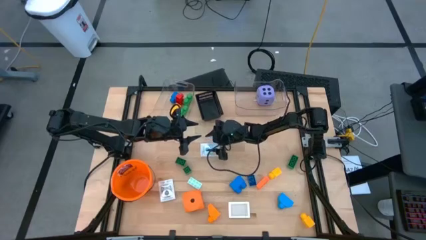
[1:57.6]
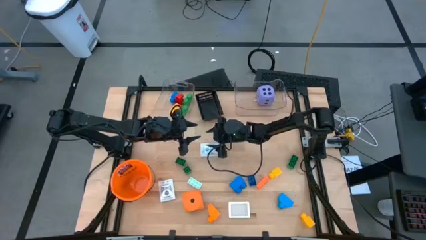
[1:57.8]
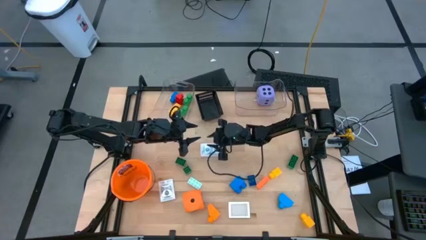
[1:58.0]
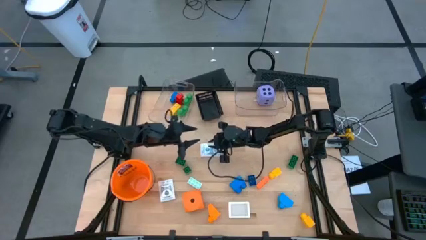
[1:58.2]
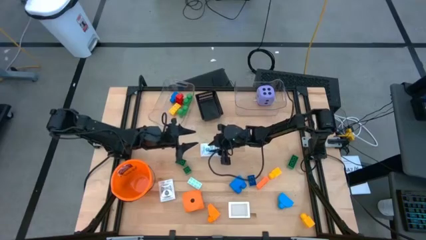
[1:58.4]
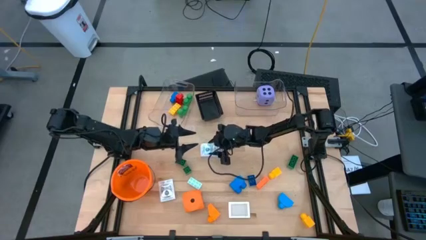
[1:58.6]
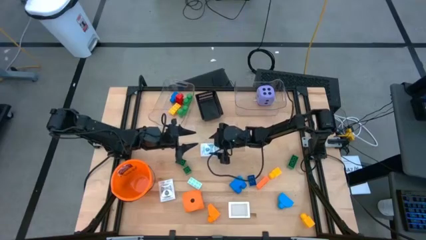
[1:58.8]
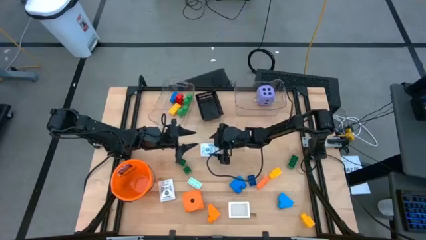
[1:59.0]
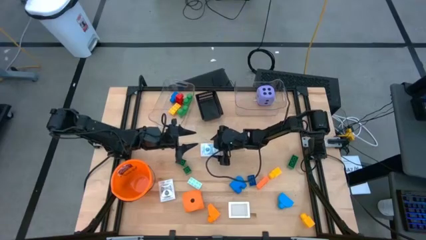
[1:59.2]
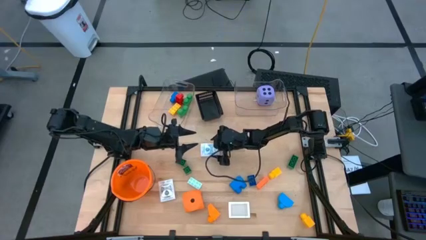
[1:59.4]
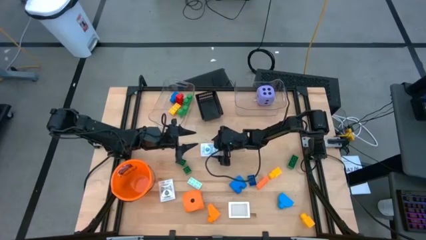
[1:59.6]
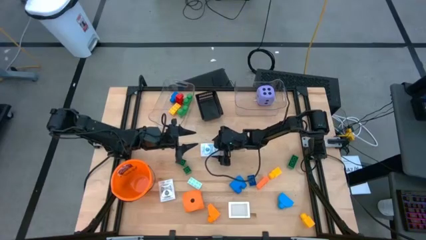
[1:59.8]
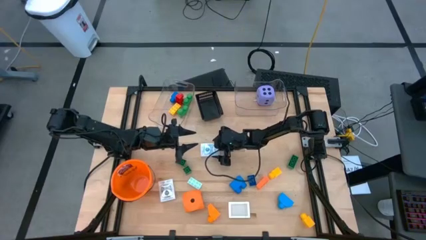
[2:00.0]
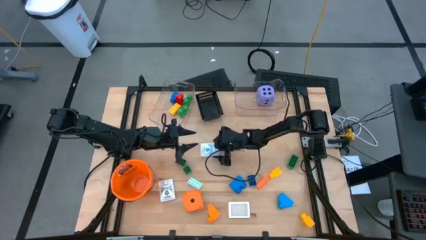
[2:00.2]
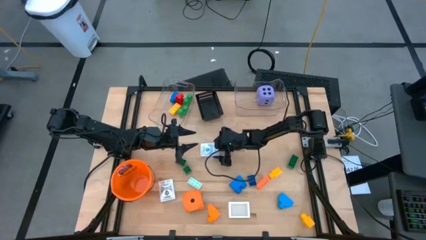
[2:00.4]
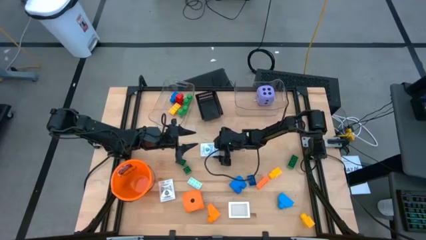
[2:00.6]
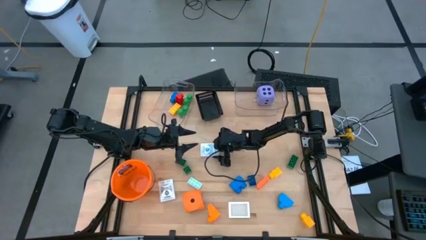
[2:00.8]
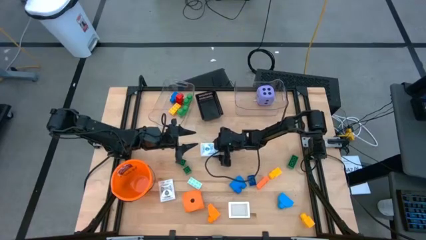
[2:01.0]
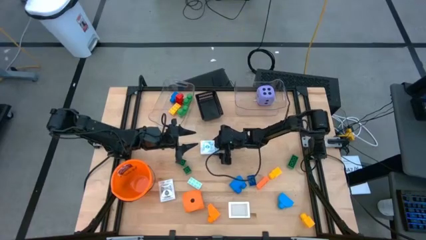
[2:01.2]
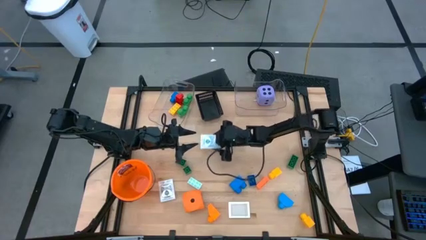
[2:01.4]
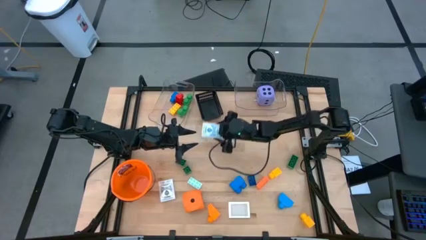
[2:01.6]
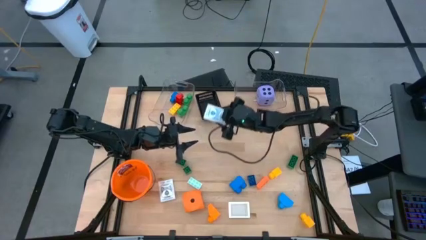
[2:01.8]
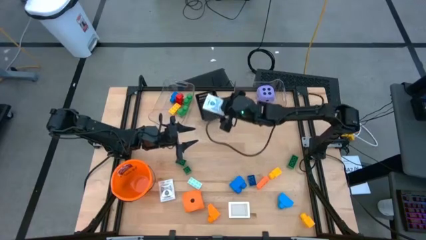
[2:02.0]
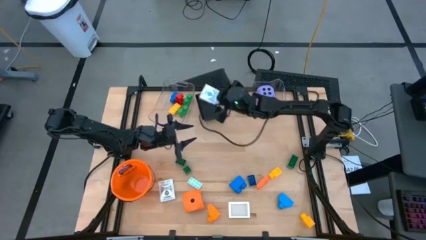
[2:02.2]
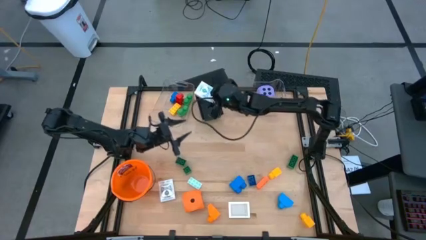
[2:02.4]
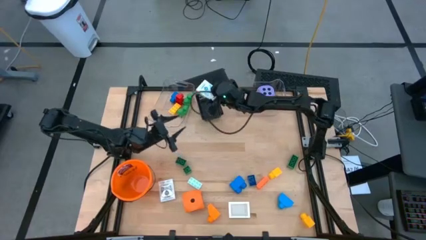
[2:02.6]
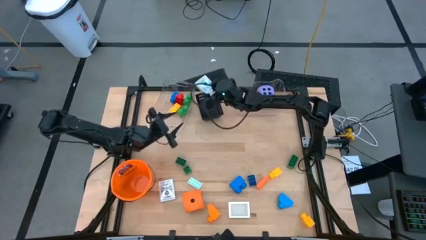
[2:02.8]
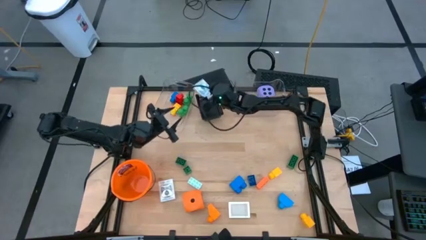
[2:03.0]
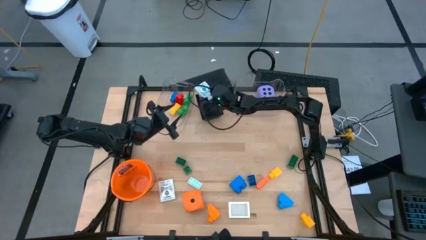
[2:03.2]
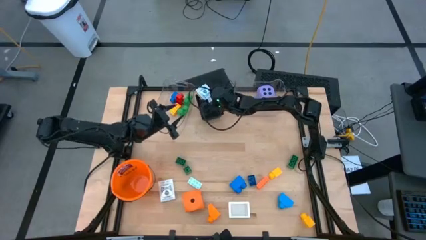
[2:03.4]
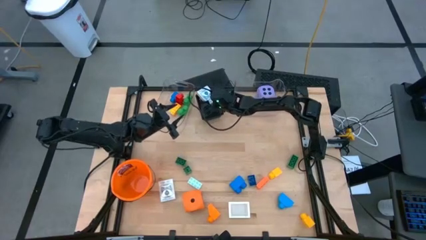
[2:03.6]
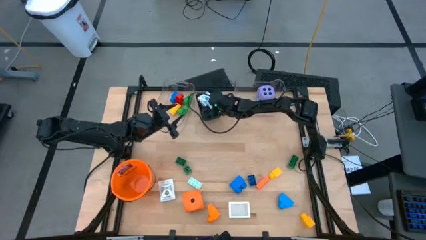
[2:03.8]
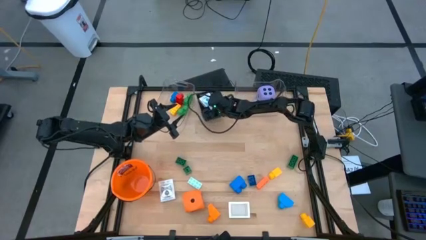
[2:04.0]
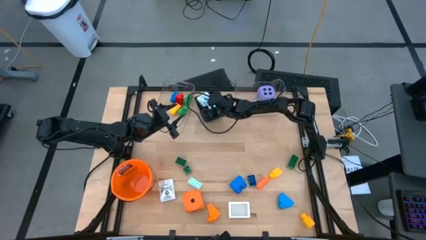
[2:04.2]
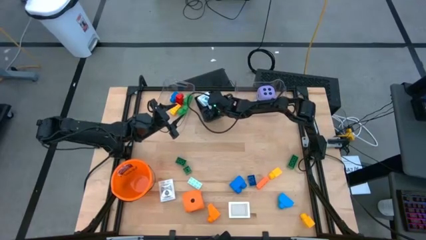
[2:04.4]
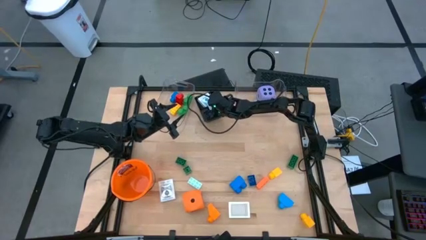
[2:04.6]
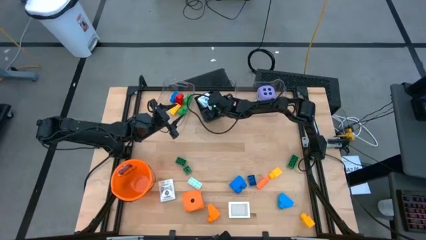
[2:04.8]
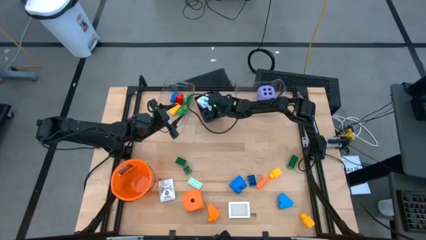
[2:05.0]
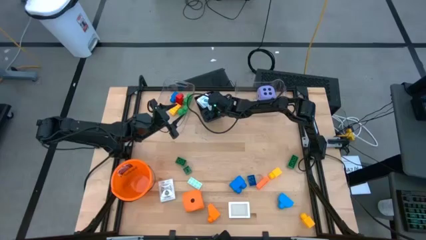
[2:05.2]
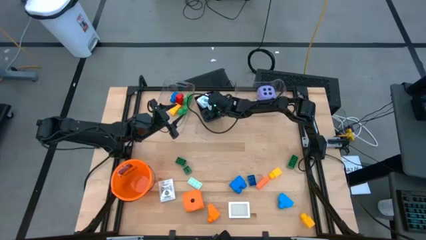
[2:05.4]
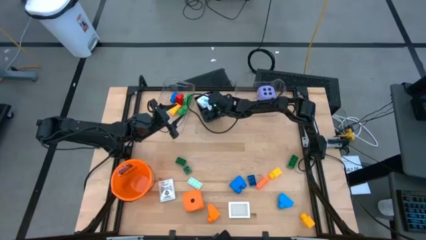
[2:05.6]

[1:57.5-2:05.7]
Task: Pick & Place Toys
Put the blue deck of cards into the black basket

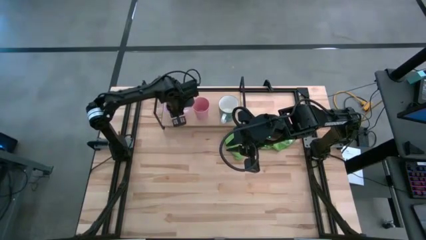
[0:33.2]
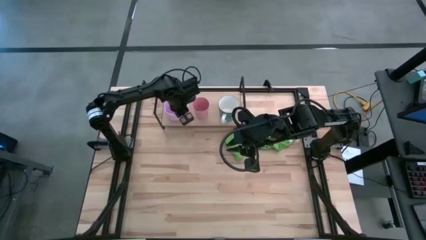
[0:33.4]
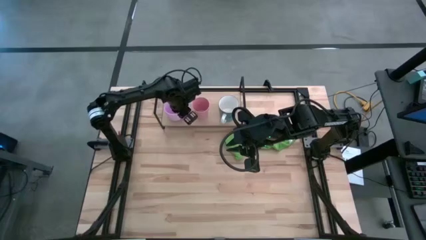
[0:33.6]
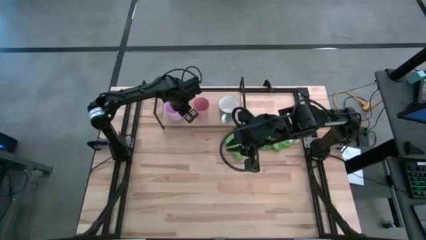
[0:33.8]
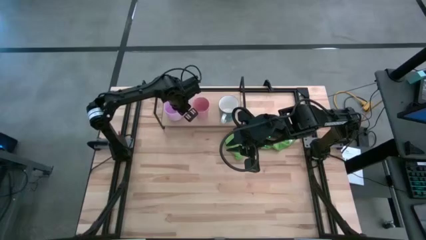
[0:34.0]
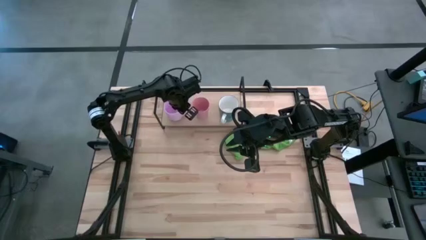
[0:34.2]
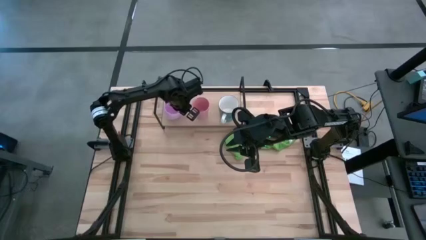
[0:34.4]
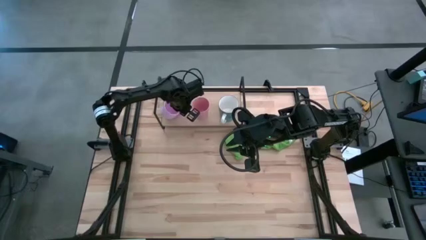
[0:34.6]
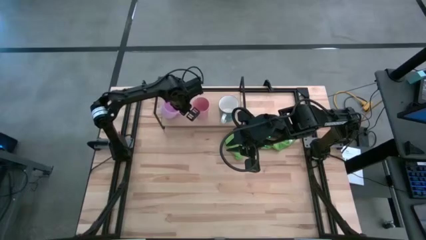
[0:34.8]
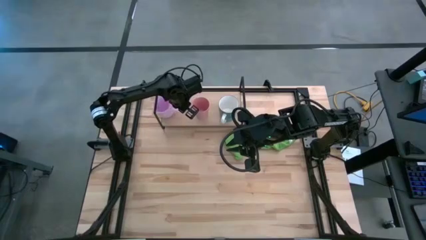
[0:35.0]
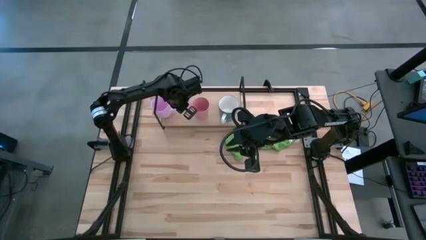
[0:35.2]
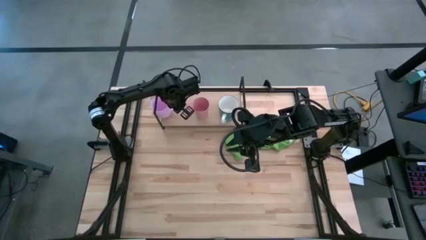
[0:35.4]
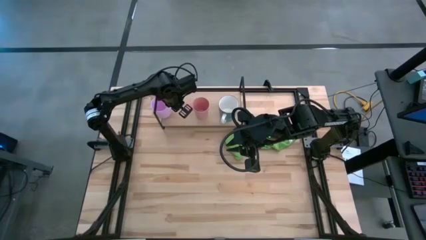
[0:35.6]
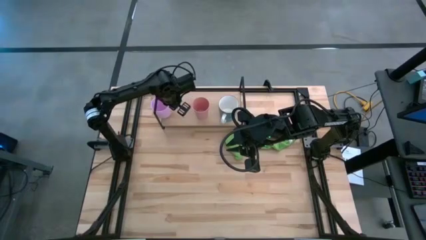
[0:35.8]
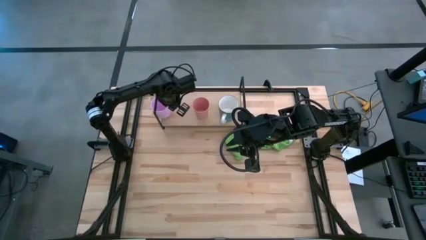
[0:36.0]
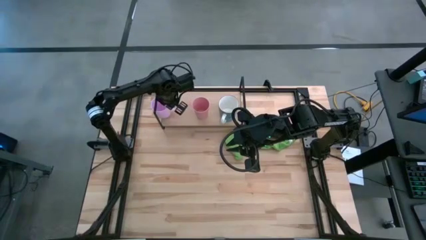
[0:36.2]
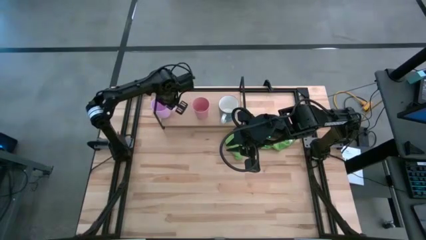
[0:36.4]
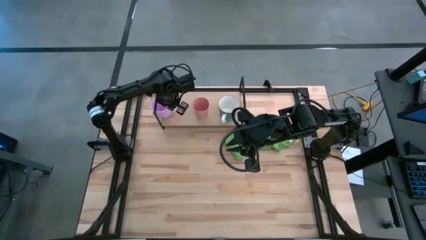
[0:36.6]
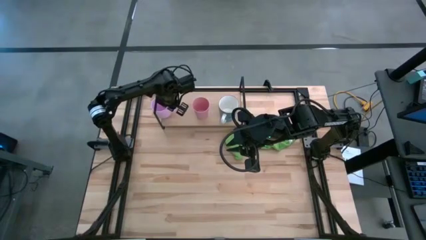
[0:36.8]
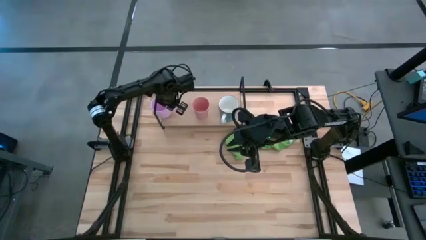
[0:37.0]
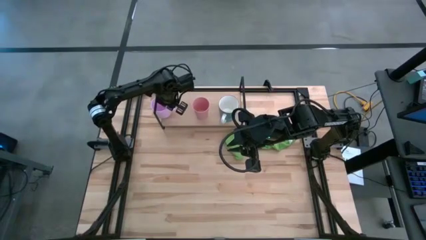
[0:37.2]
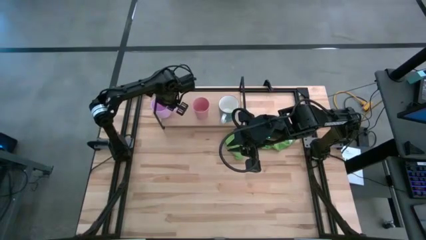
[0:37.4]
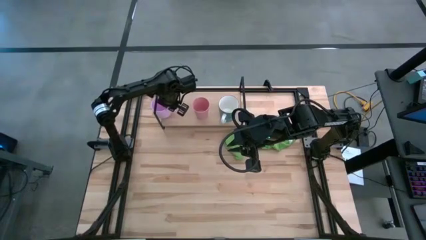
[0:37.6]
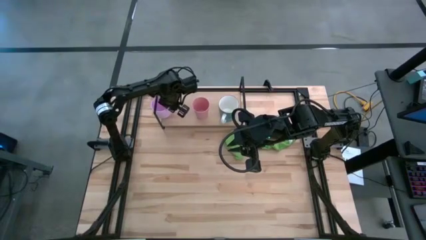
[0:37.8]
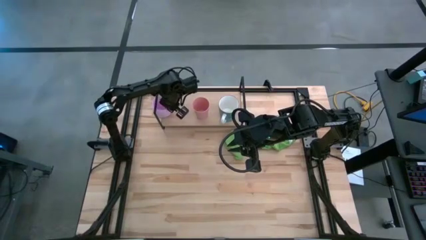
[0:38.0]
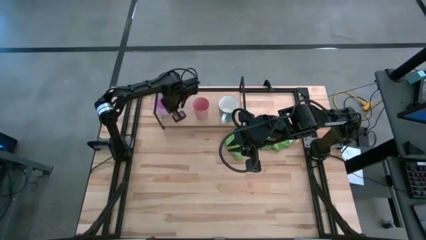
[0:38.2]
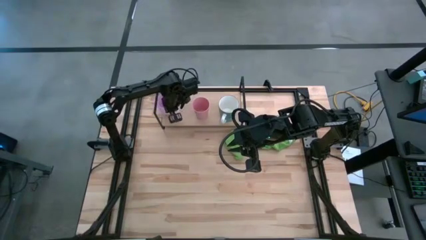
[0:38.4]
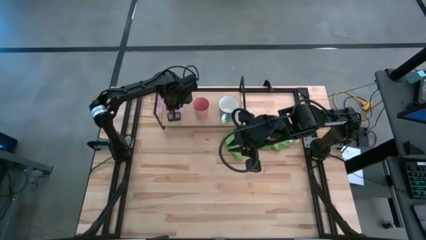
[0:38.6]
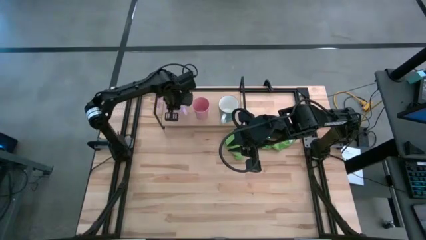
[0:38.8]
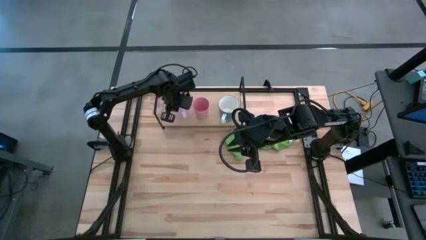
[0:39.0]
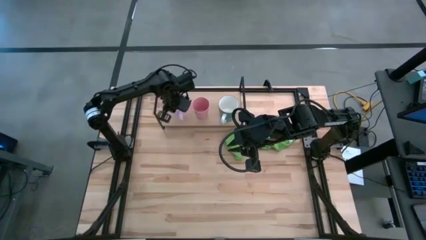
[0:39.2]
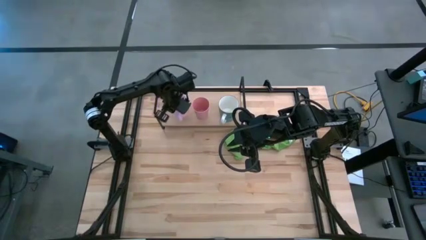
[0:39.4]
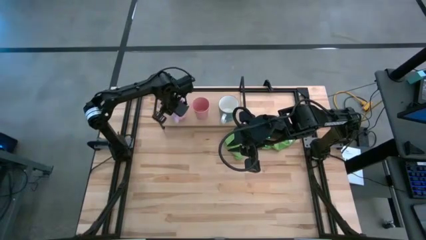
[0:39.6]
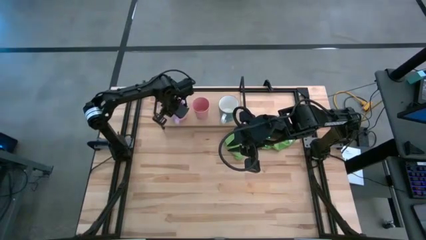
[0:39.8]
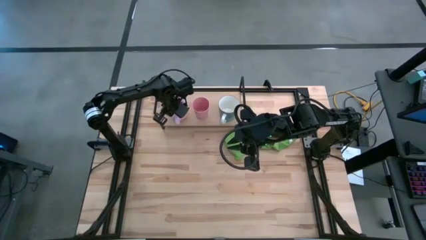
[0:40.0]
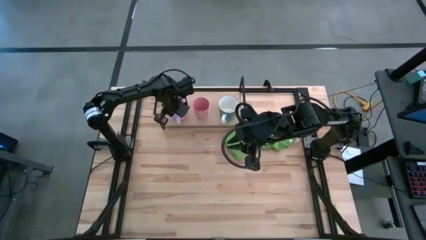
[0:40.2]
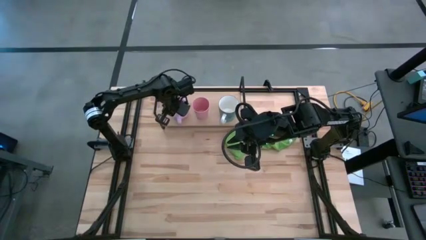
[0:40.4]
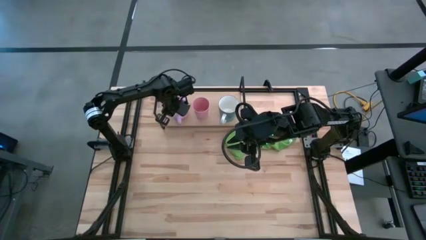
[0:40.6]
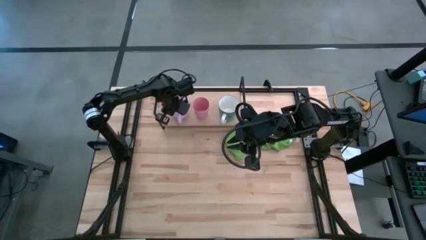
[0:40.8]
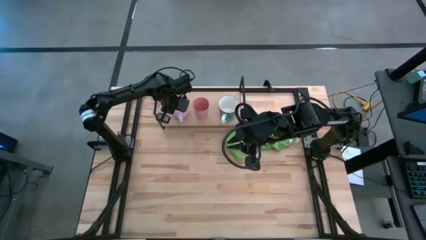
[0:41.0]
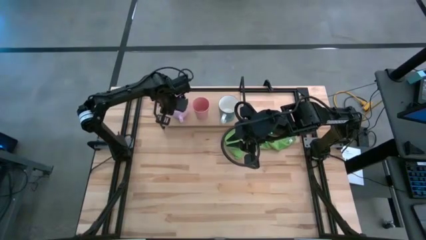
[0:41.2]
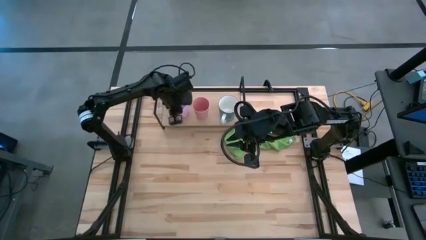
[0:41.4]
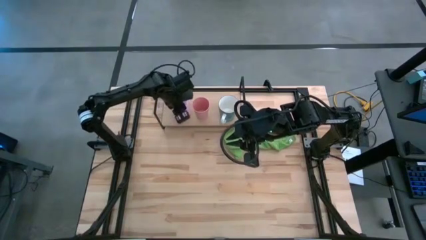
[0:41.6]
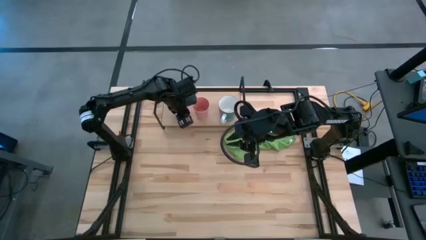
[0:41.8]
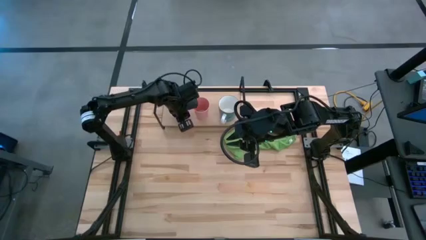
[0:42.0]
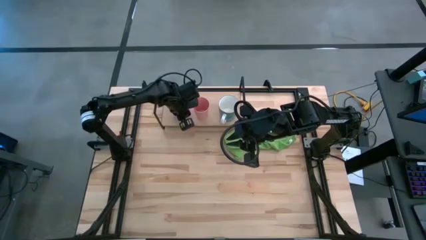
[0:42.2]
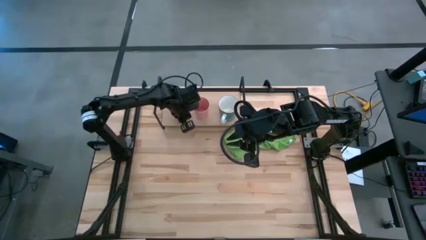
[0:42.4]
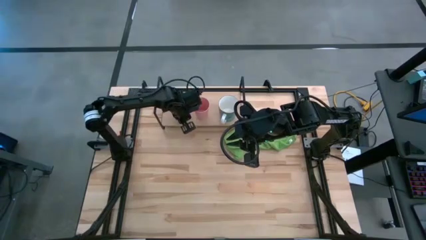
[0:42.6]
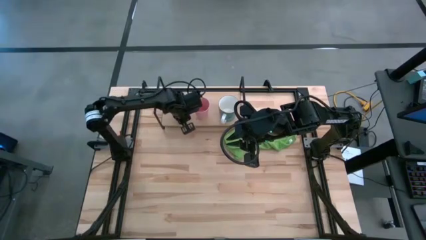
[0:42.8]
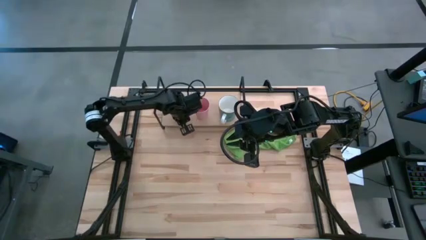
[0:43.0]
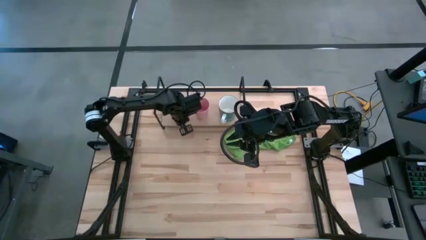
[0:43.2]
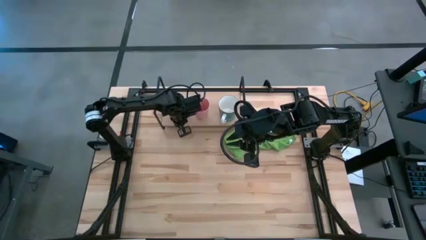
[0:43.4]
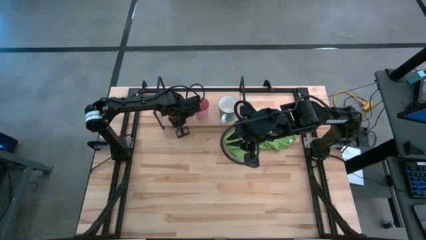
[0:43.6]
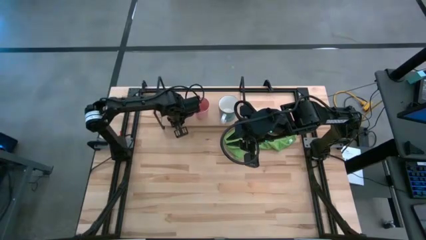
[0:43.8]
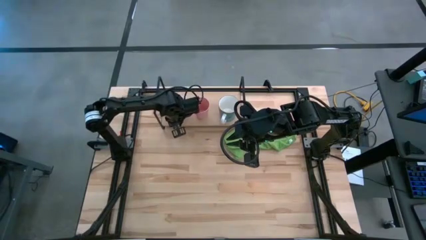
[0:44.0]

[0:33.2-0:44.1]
Task: Stack small to large cups/mugs on shelf
Put the violet mug on the shelf
